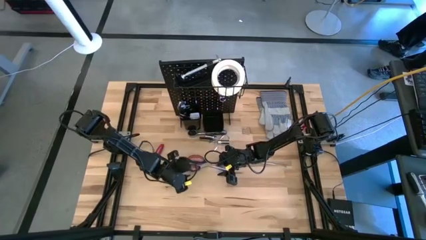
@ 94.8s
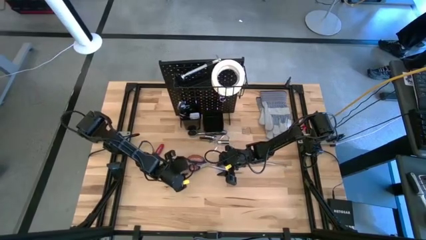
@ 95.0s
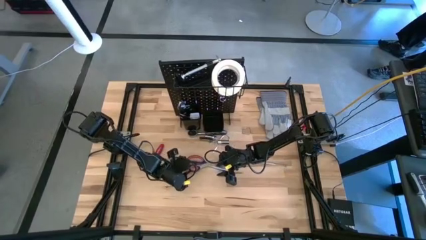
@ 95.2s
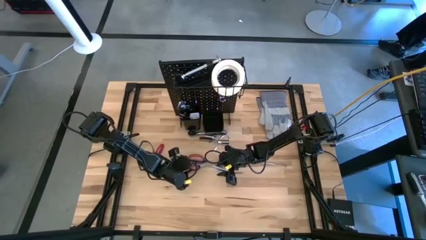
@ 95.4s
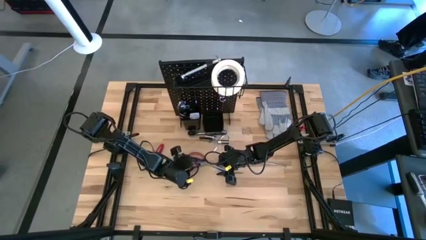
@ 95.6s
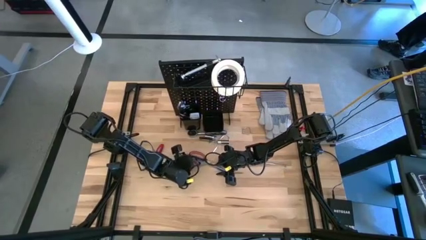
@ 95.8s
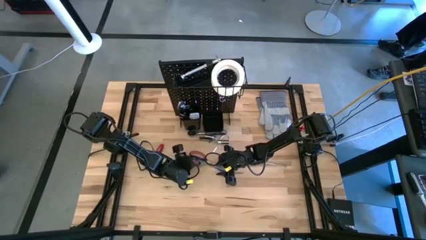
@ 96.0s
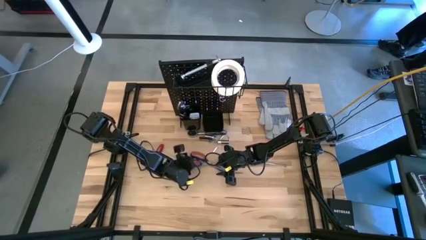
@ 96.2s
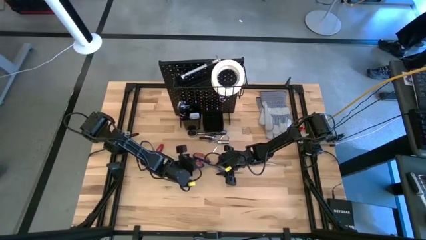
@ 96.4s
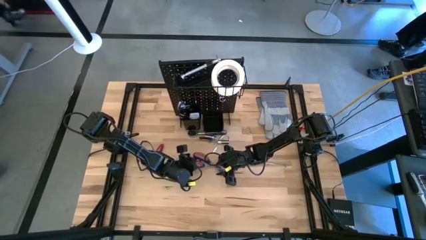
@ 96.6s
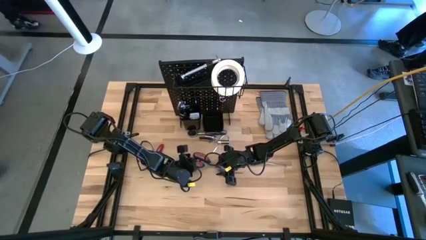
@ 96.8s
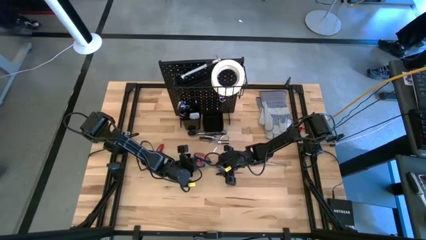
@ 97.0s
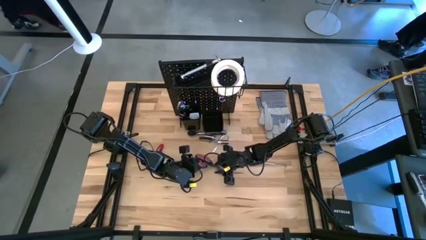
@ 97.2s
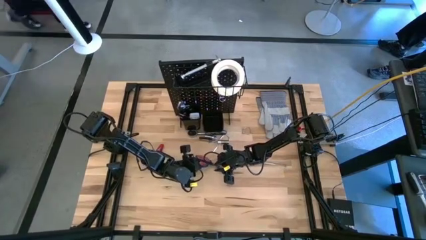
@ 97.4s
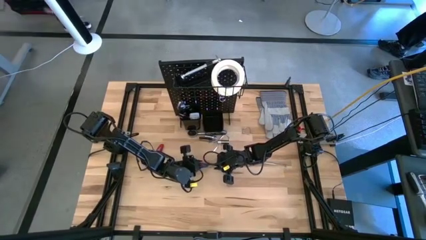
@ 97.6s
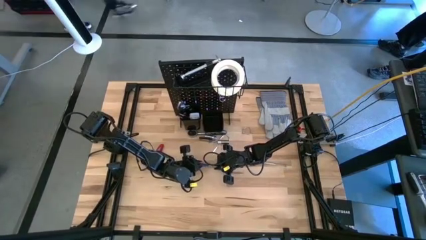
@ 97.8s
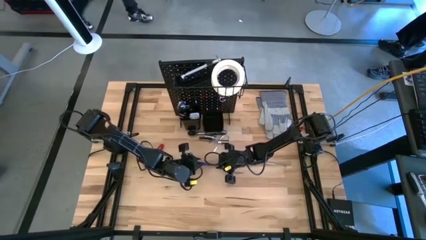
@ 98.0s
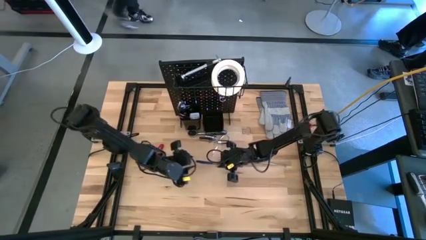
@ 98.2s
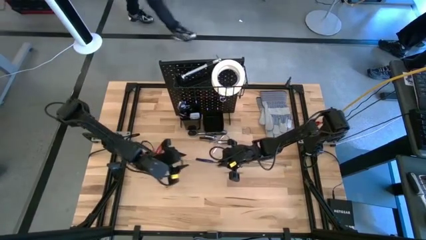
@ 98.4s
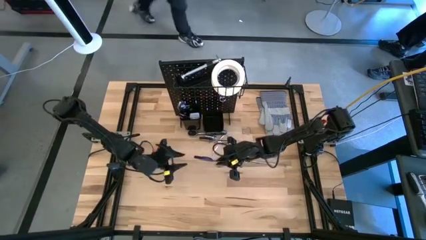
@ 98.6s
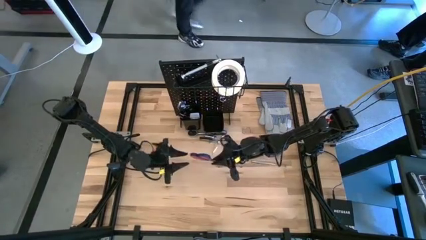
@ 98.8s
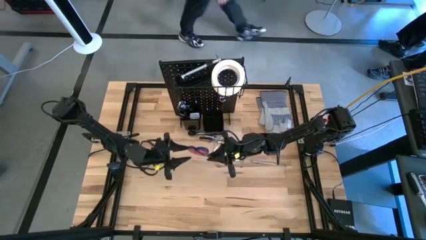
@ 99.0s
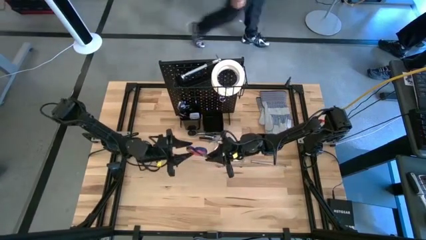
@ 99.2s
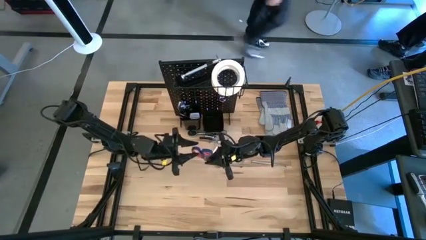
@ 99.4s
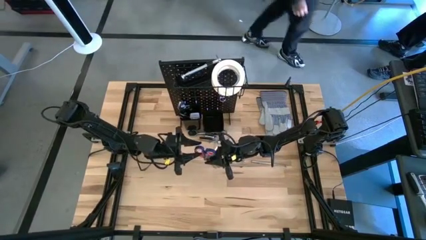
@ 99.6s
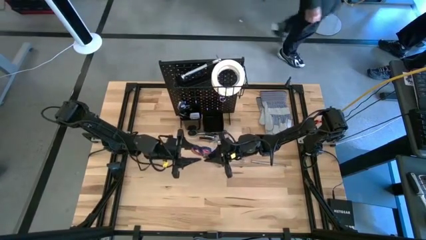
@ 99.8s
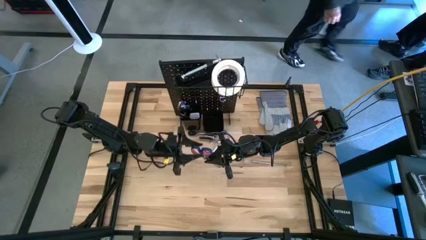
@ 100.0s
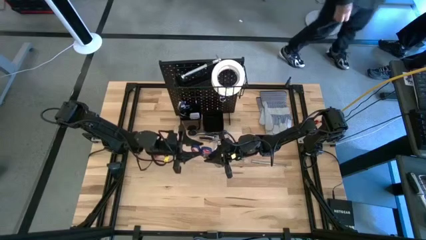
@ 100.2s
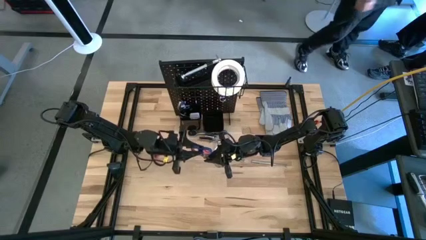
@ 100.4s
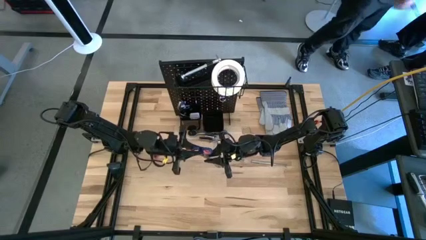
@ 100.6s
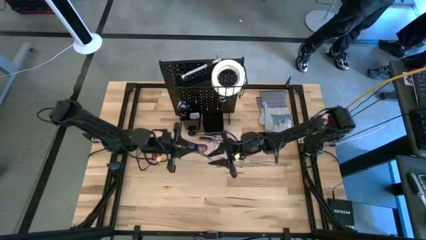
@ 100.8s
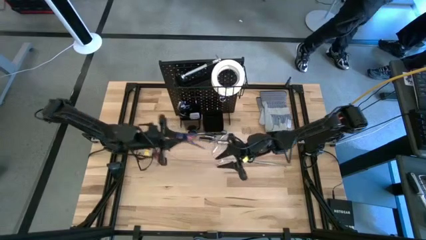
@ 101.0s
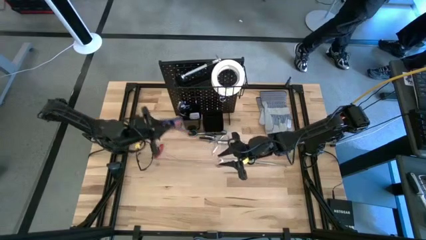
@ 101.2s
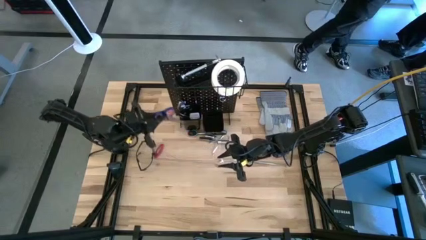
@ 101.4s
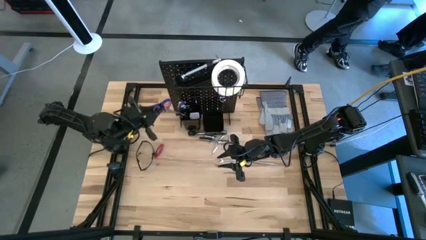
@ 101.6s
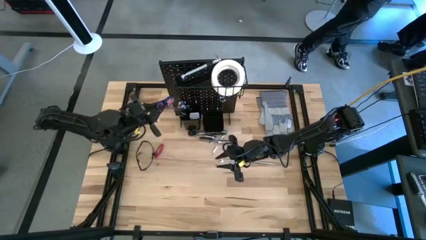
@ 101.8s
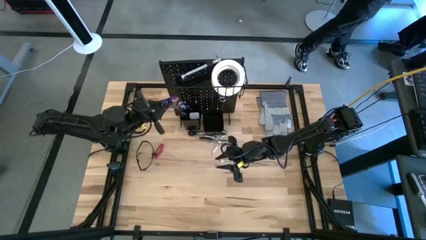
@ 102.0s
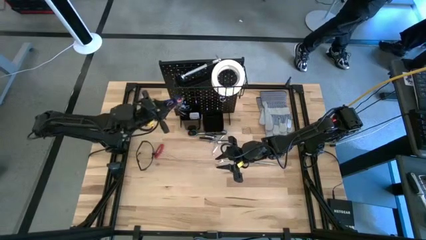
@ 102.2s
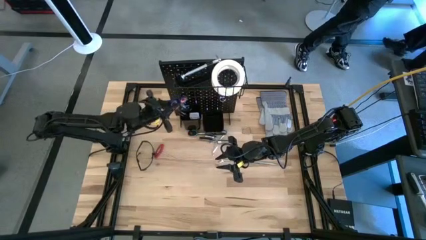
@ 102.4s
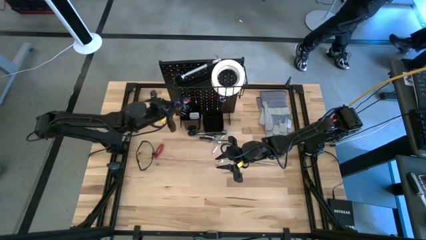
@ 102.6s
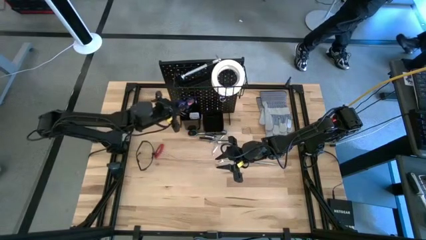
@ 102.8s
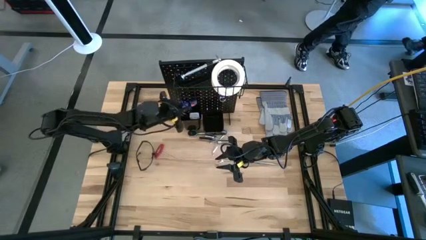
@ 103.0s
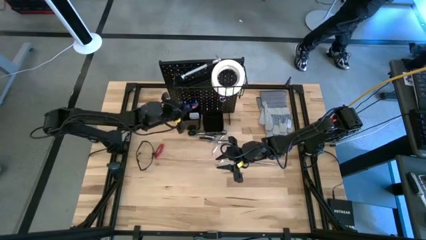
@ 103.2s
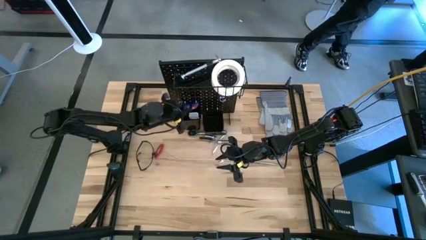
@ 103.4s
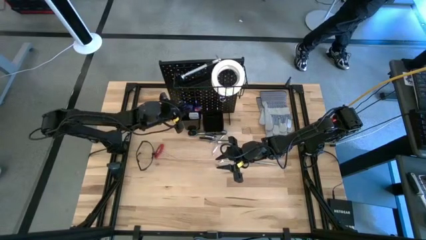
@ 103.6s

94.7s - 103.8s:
Task: Hang tools onto peg board
Put the scissors into the left bin on the pegboard

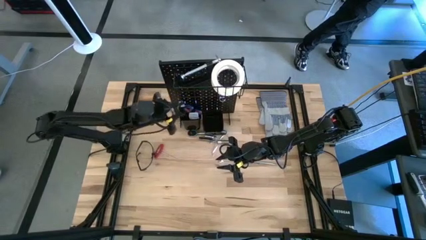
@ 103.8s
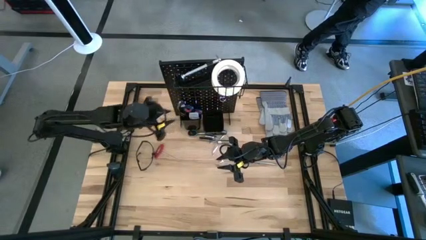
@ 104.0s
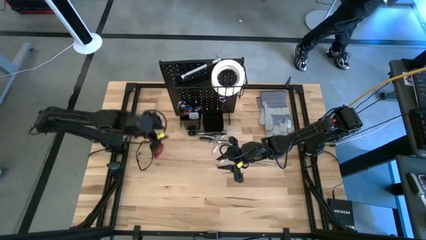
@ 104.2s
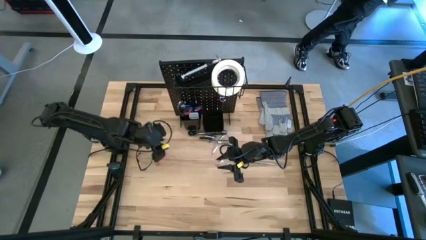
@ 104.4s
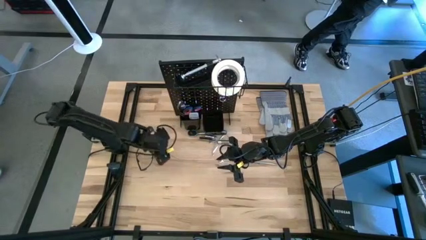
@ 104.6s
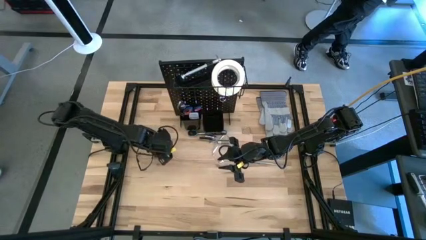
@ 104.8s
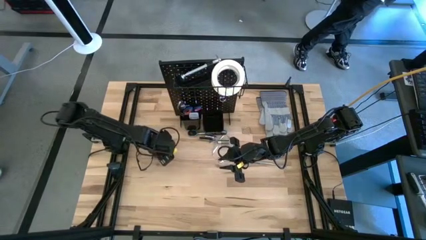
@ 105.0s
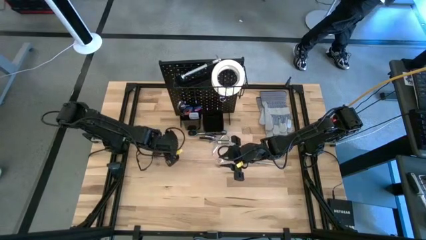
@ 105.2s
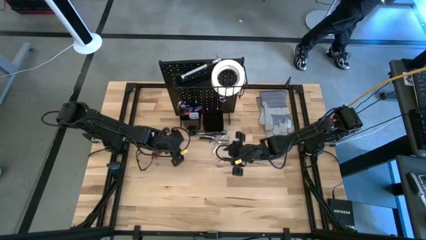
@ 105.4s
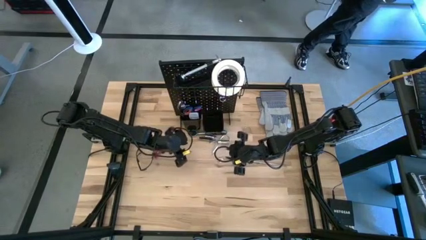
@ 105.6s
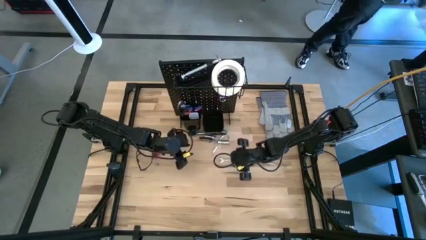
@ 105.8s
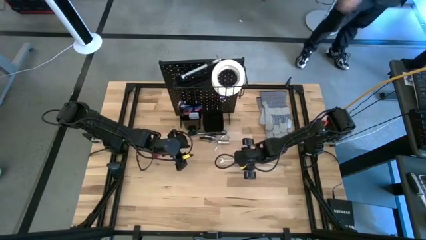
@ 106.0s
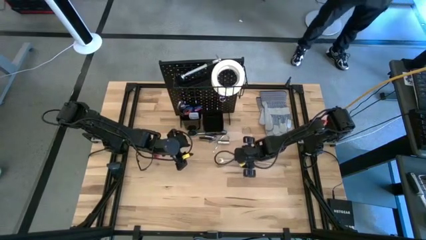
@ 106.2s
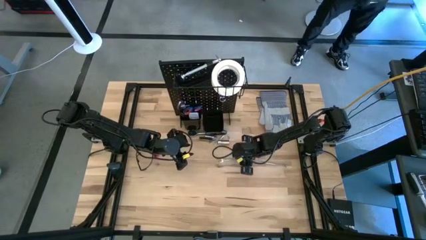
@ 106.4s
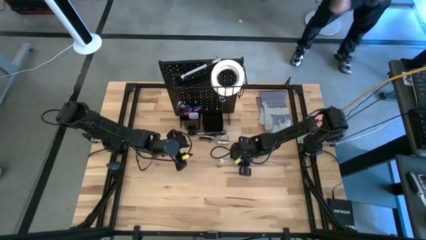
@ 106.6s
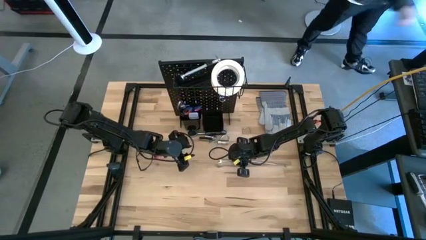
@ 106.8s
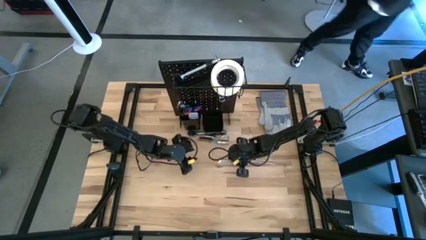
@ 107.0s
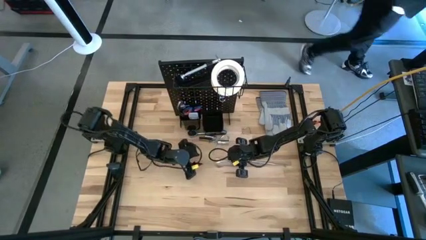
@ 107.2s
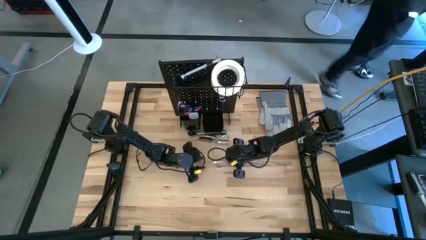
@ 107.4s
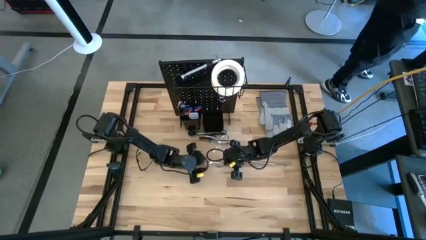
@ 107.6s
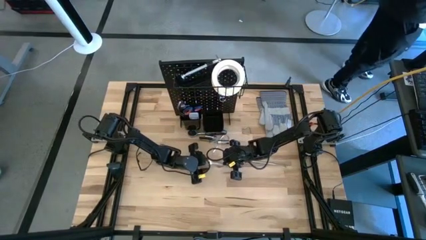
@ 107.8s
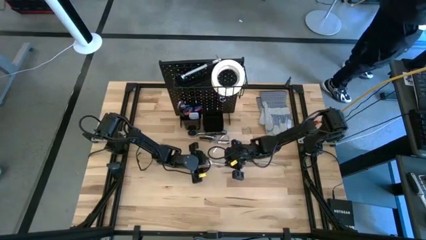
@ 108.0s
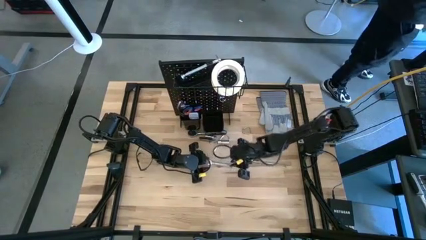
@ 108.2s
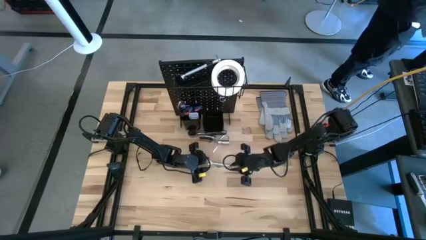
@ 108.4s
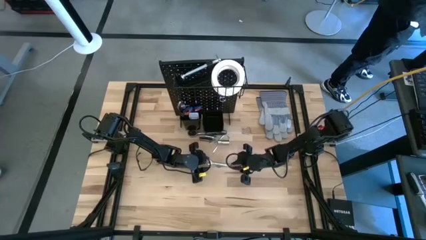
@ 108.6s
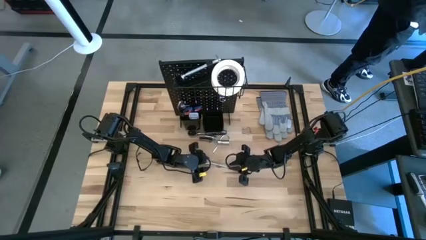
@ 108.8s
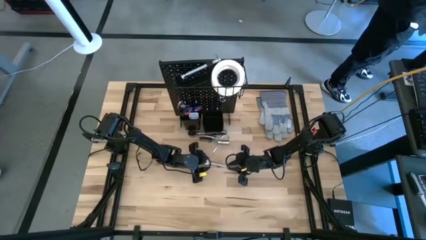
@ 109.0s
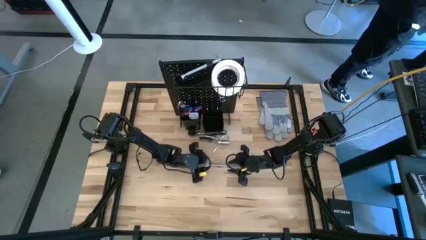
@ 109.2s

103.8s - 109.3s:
Put the wrench into the right bin on the pegboard
